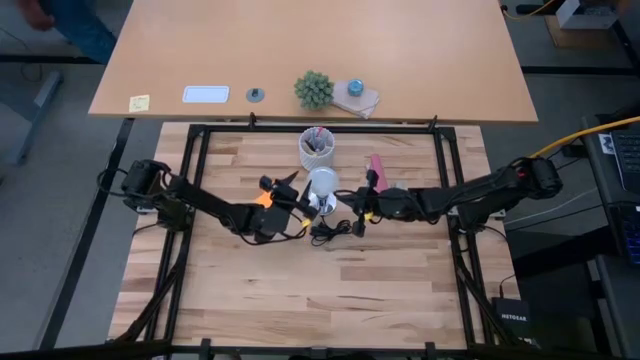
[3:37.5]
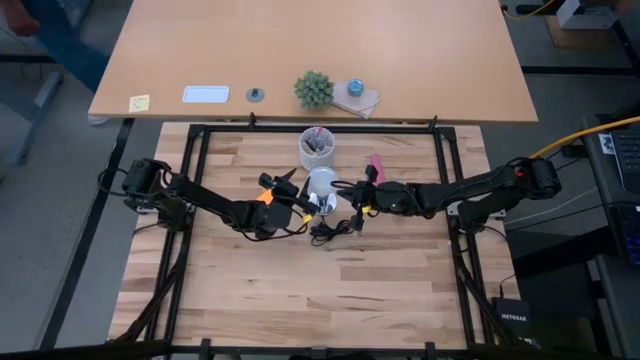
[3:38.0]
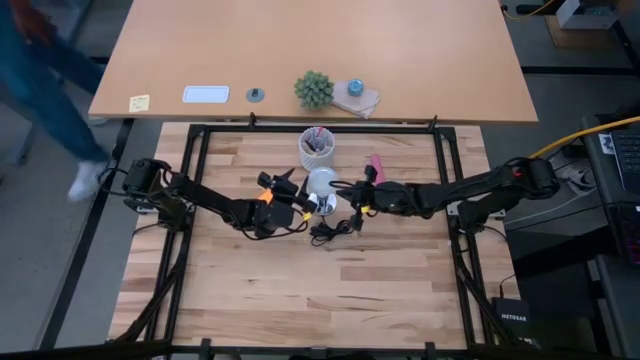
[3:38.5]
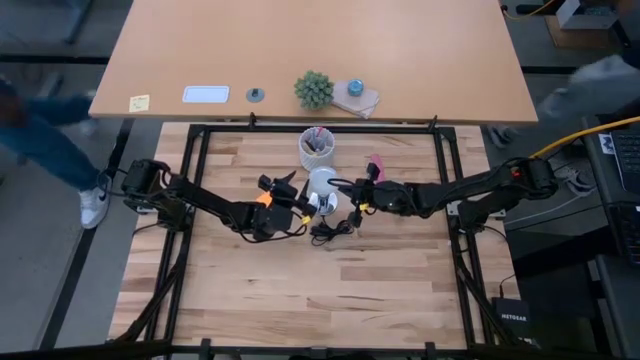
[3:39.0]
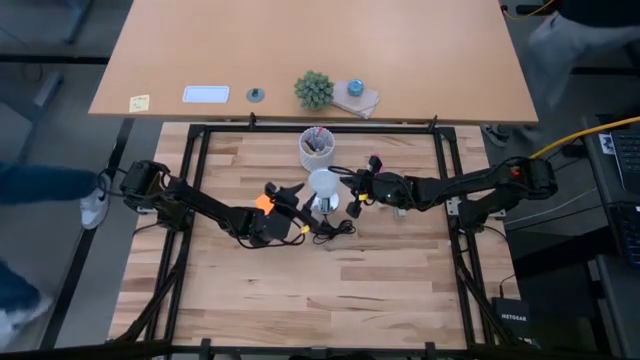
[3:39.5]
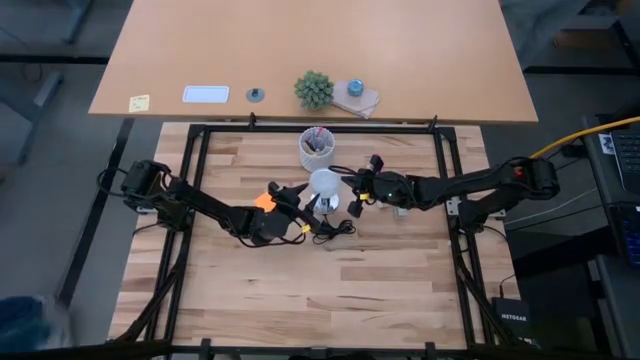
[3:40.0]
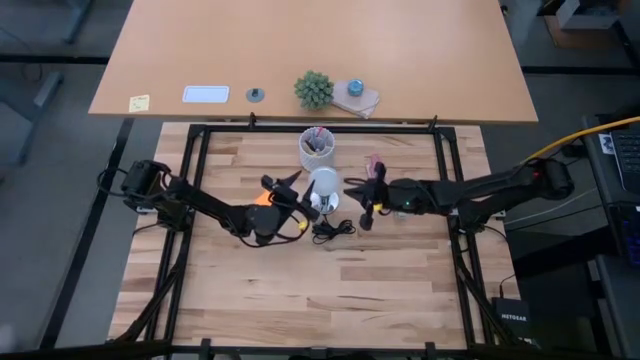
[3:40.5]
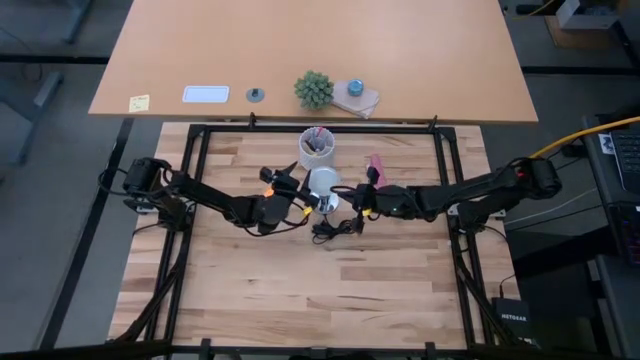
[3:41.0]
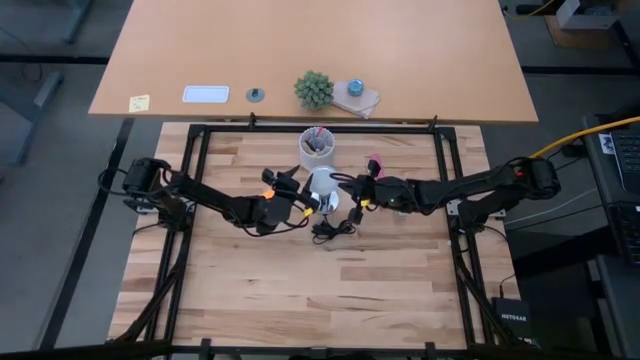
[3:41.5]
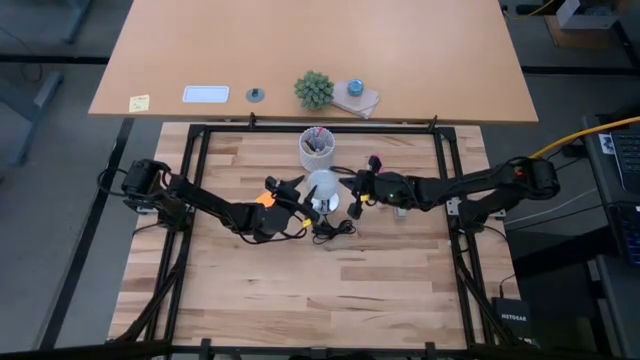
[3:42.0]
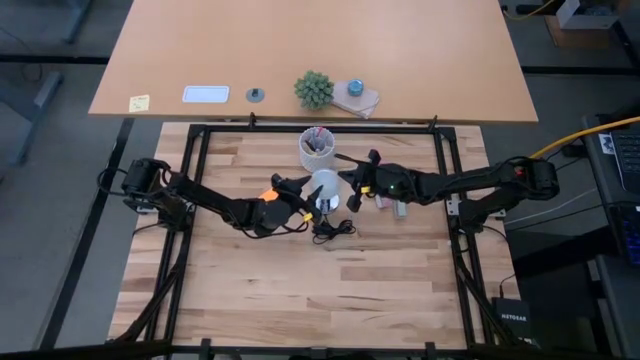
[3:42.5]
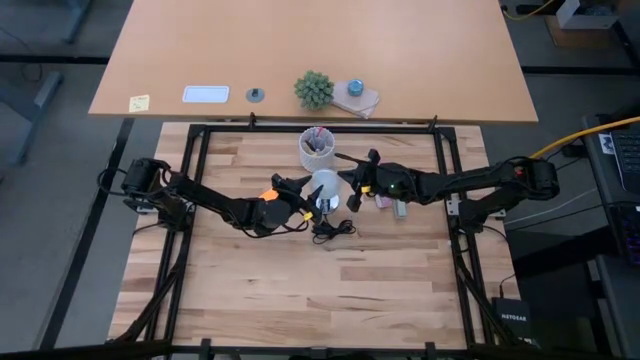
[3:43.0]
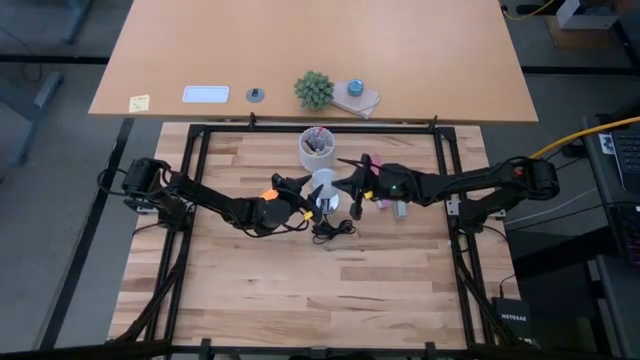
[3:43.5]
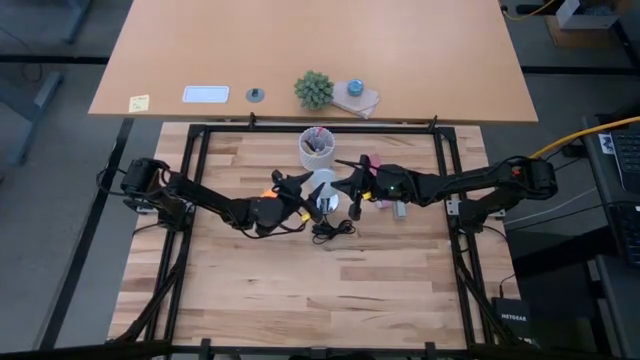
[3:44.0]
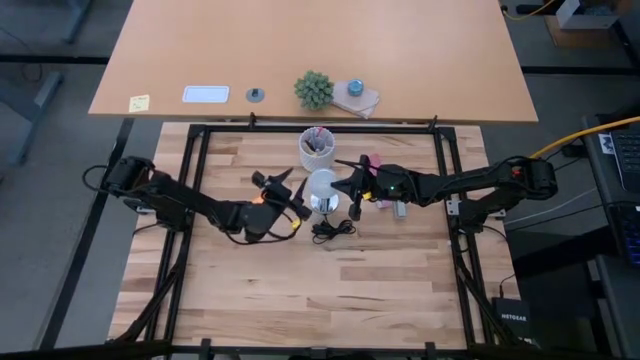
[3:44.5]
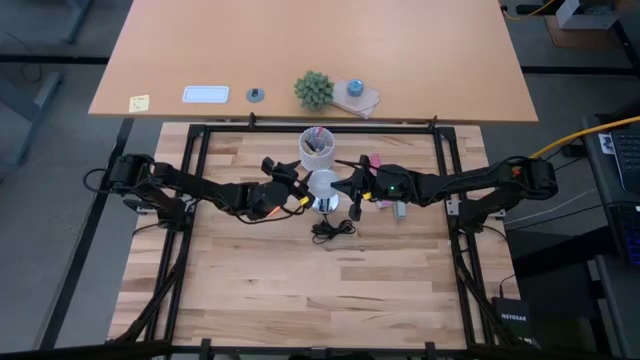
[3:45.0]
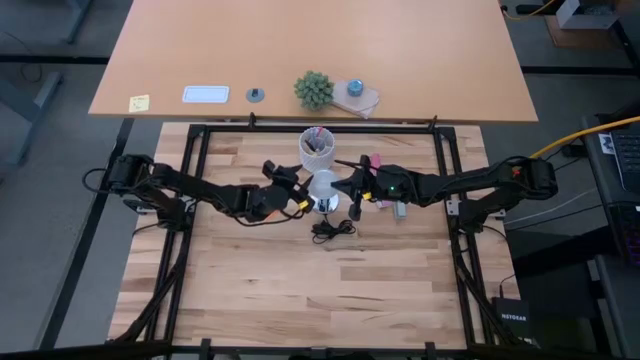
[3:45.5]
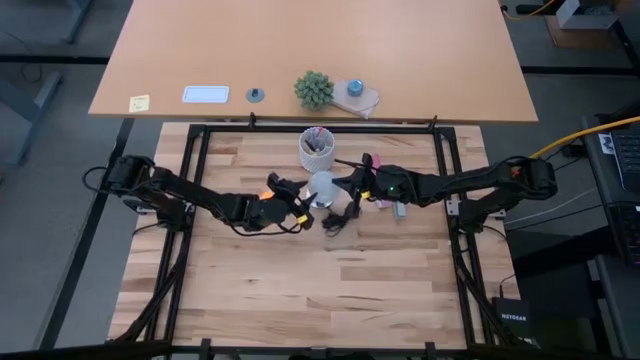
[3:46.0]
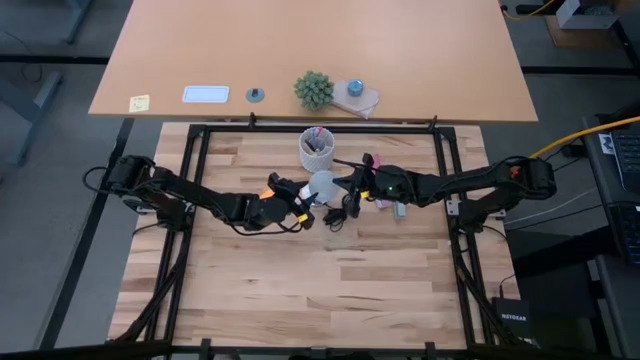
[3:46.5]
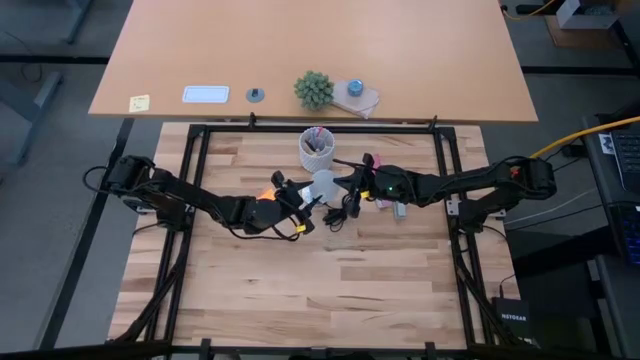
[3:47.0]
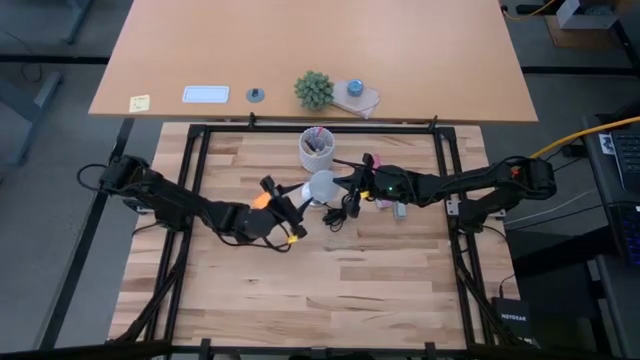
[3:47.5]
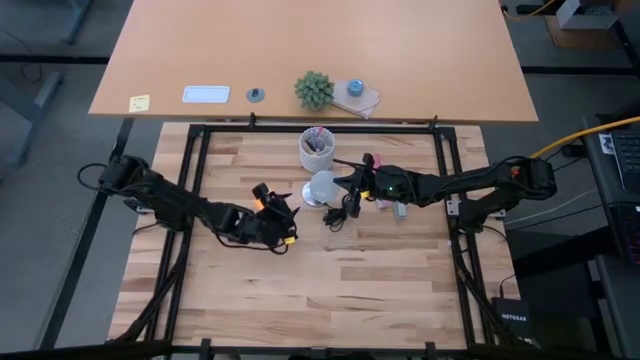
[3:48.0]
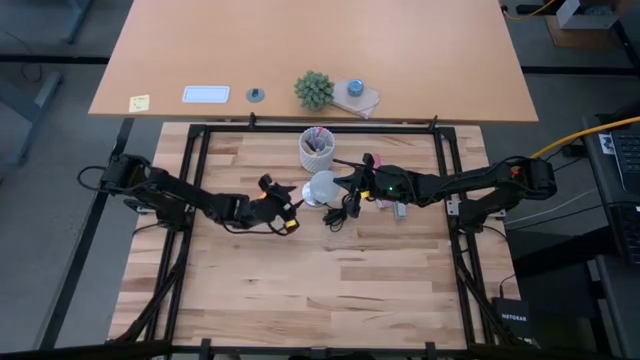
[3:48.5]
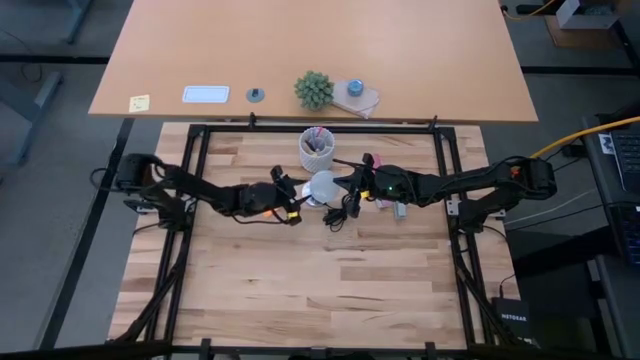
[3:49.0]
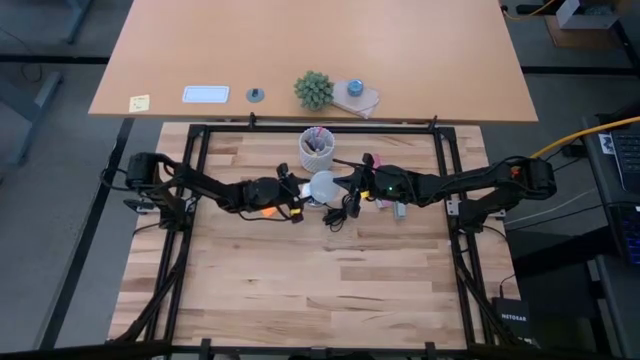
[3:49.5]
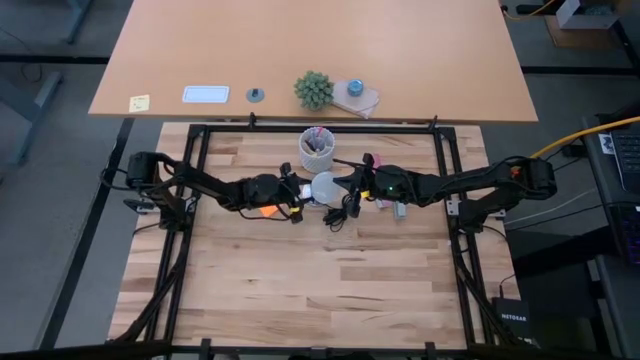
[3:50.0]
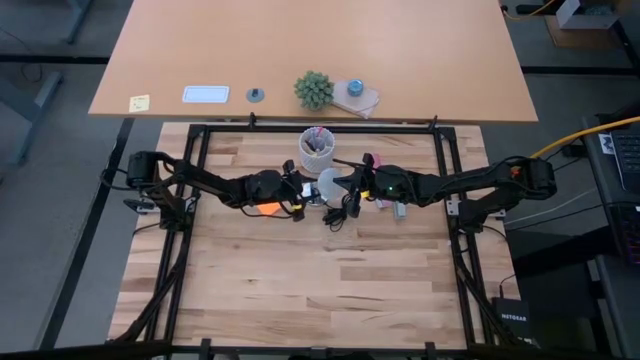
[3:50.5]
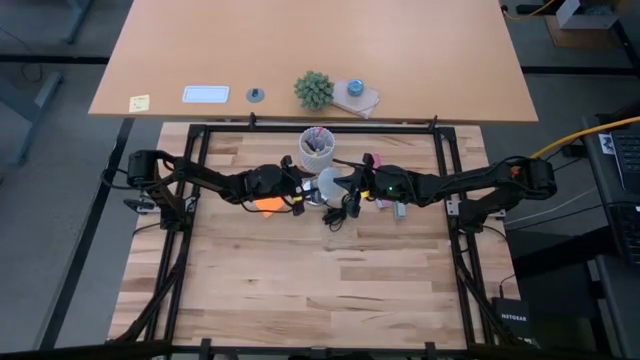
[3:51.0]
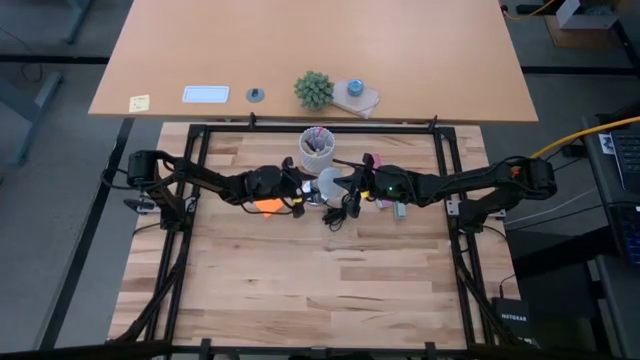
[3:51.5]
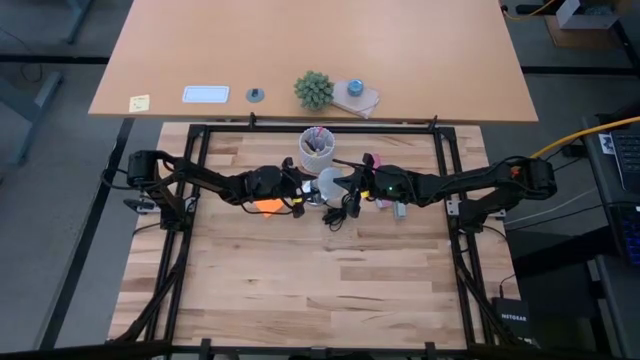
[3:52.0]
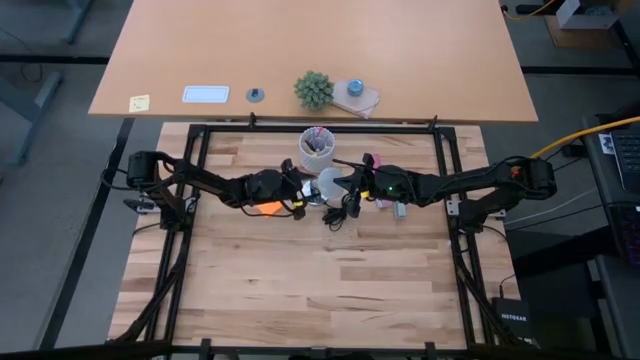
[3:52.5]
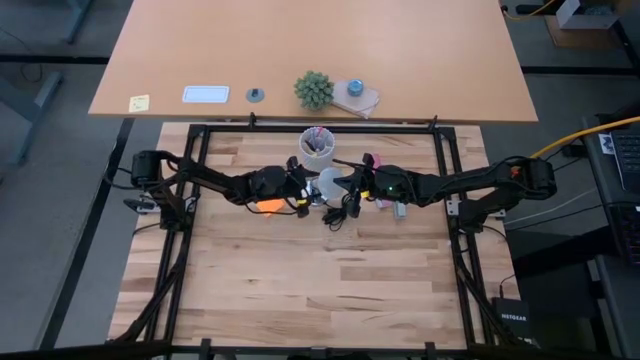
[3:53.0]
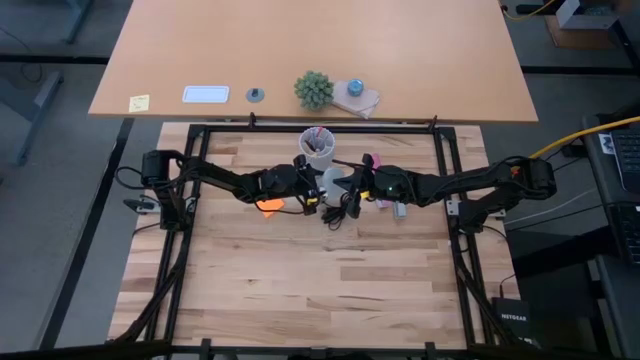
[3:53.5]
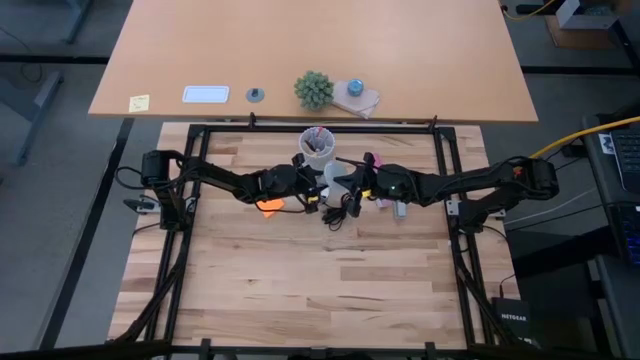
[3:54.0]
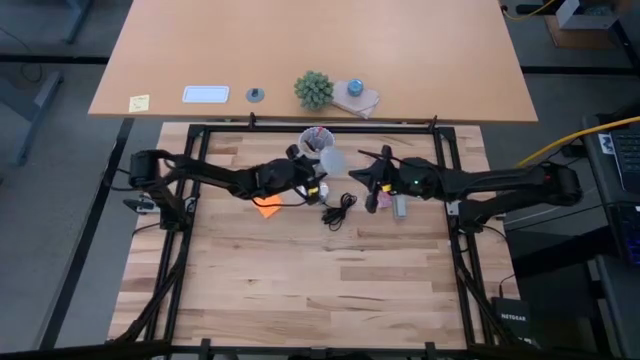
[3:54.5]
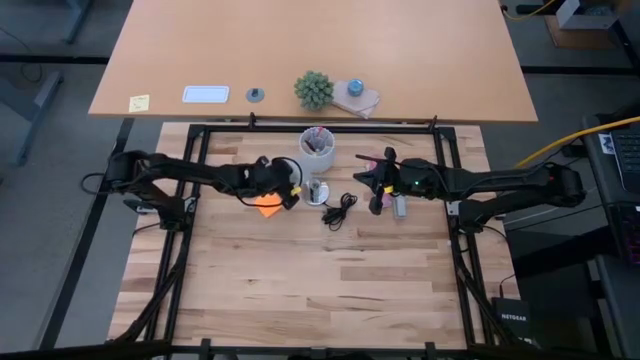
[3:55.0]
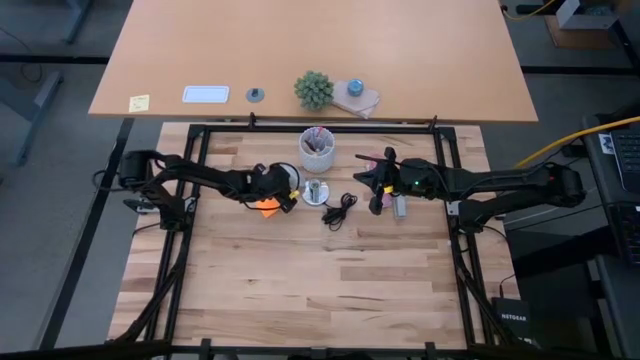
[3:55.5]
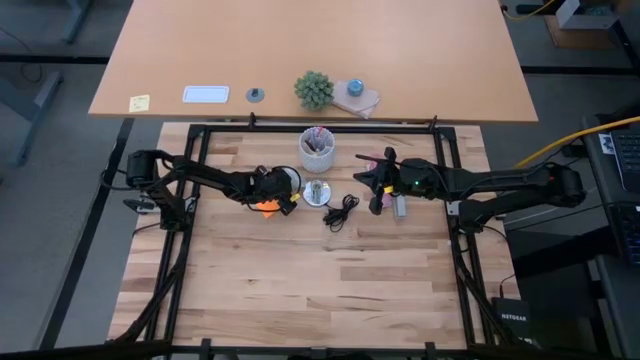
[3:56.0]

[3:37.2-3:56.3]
Task: Screw lightbulb
Remove the lightbulb from the lamp
